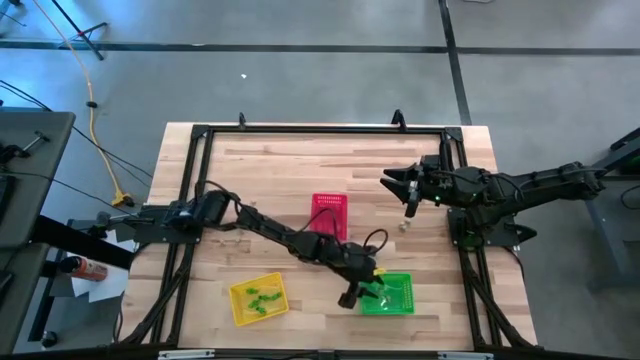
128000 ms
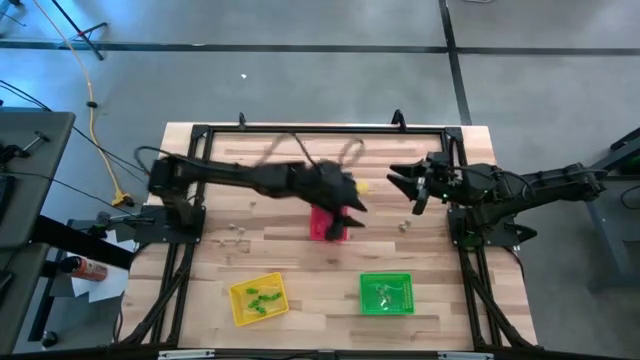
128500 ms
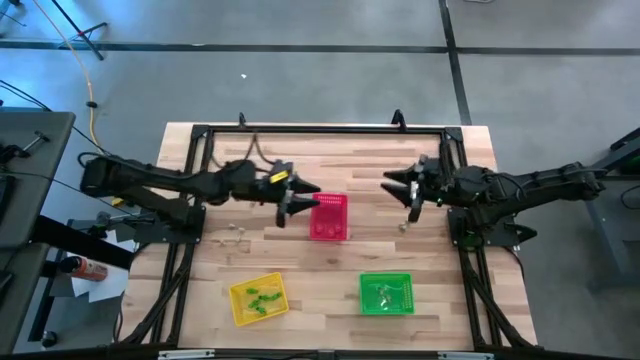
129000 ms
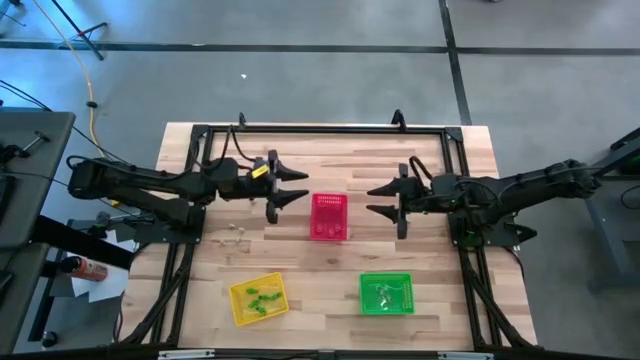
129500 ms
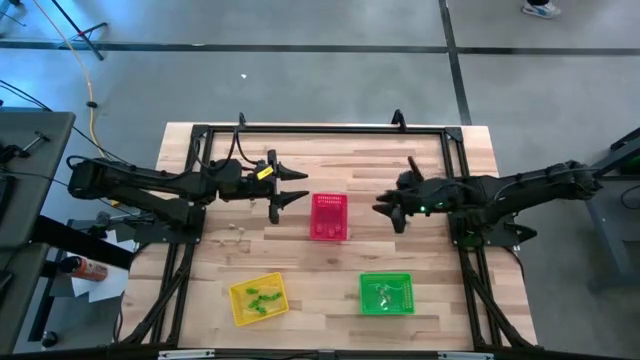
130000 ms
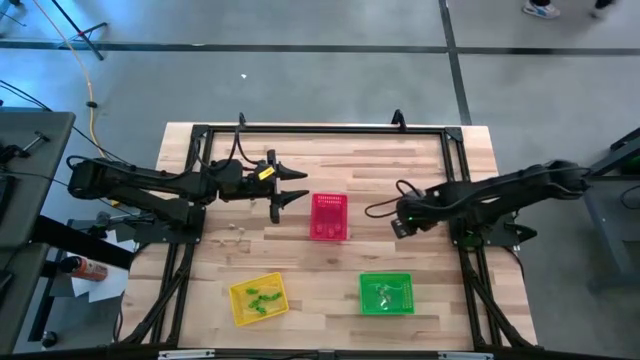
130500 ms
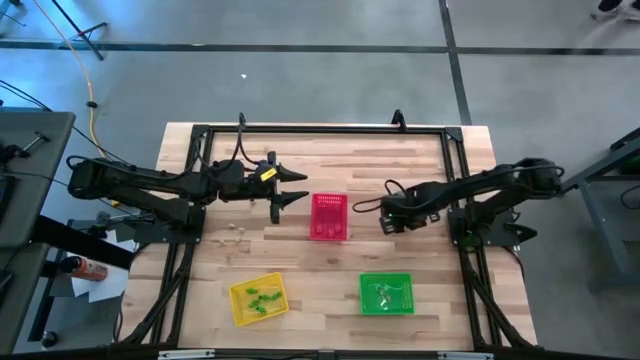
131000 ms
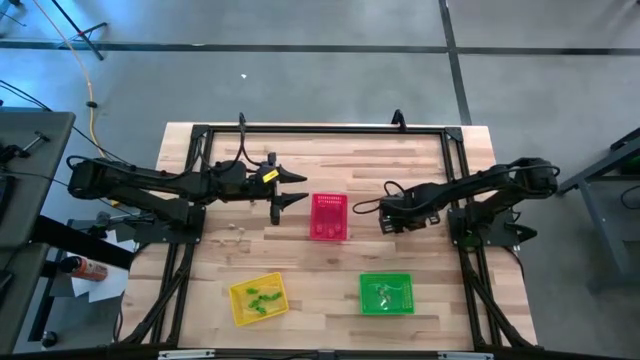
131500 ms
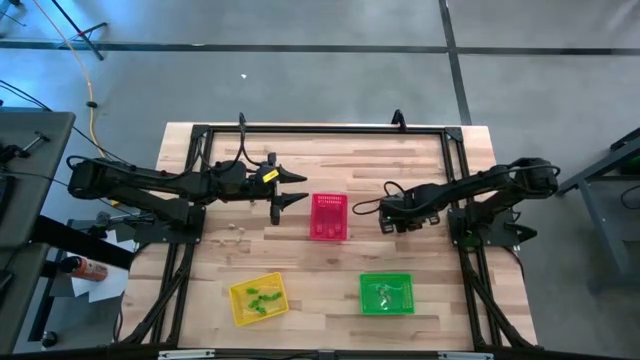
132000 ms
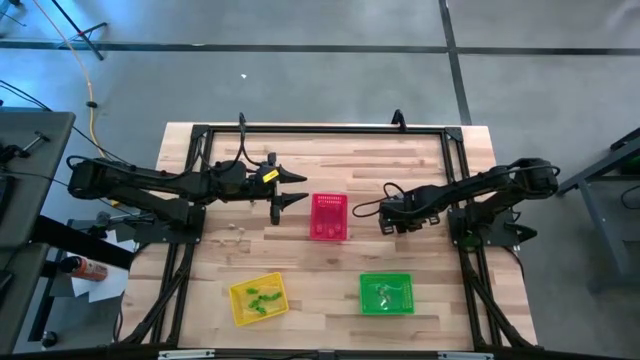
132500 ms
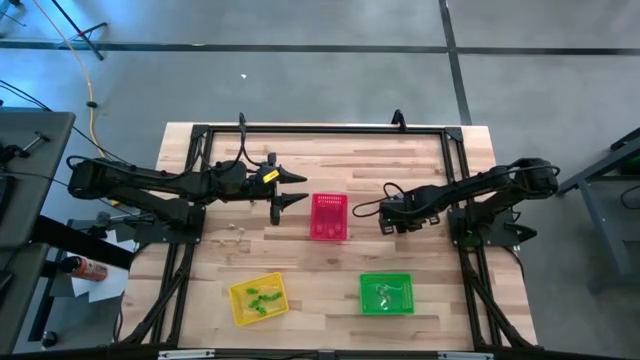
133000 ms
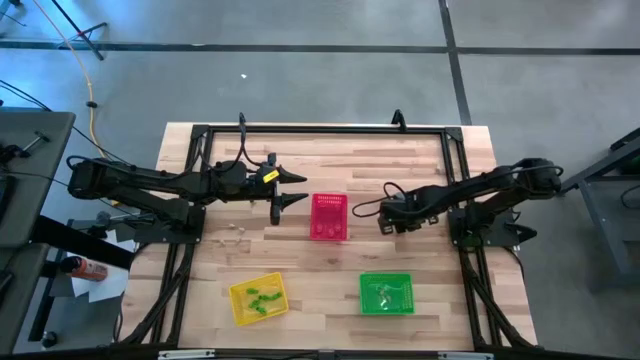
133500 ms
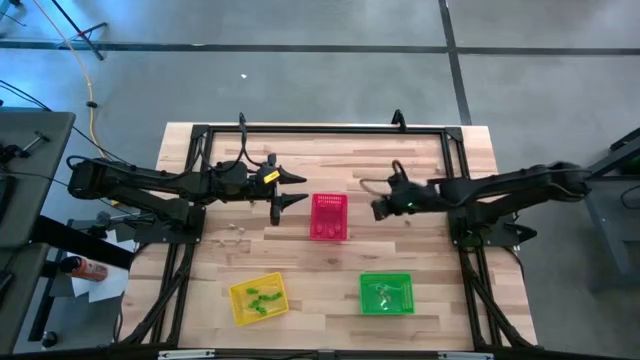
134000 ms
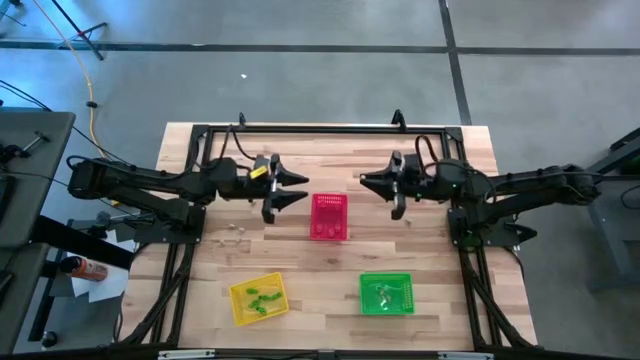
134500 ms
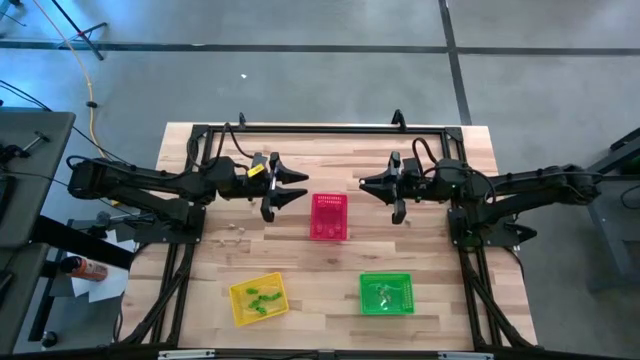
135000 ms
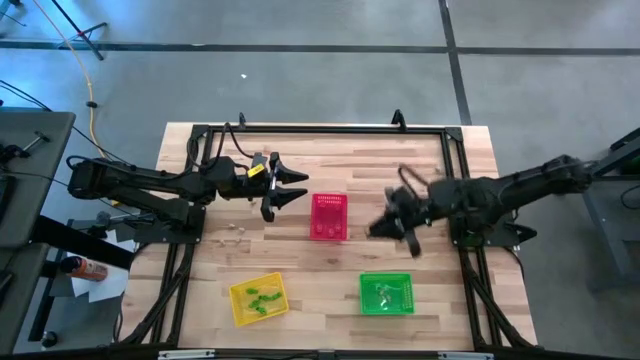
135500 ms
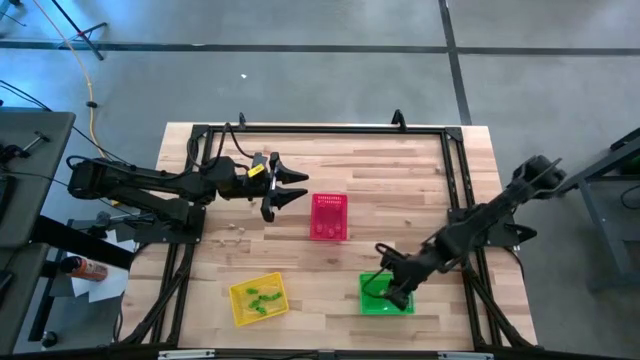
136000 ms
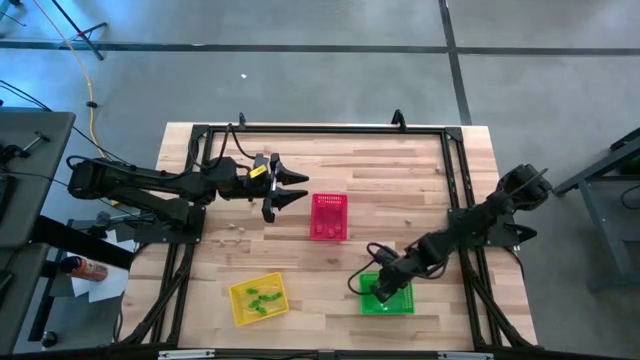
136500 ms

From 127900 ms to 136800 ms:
Task: Sort Halloween decoration
Put the white skull toy into the green bin

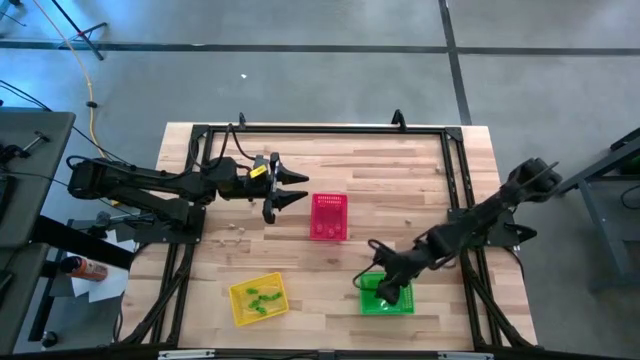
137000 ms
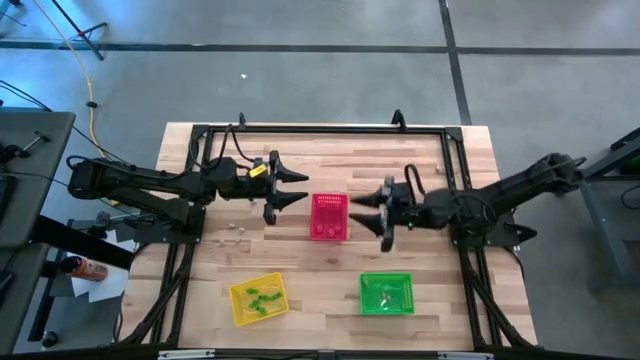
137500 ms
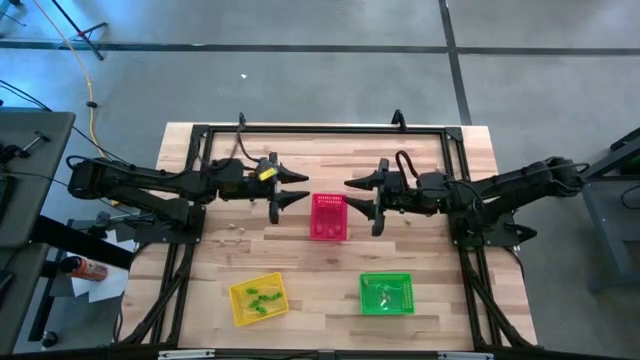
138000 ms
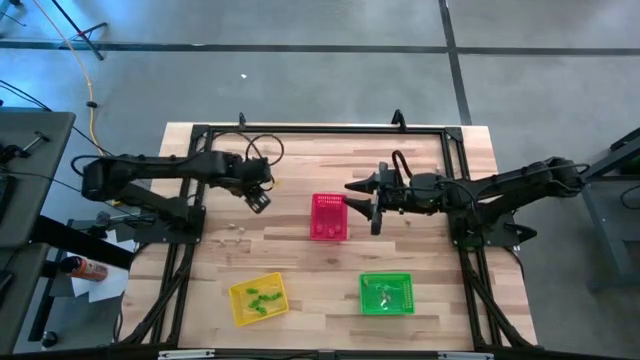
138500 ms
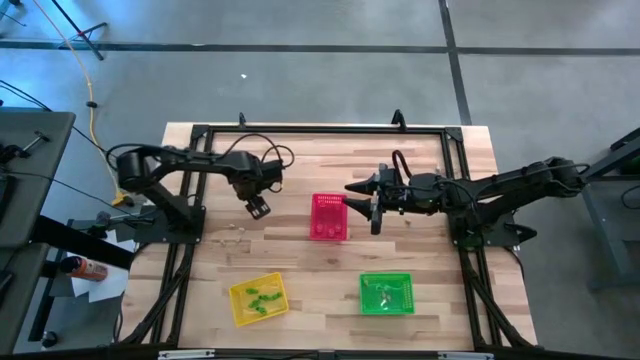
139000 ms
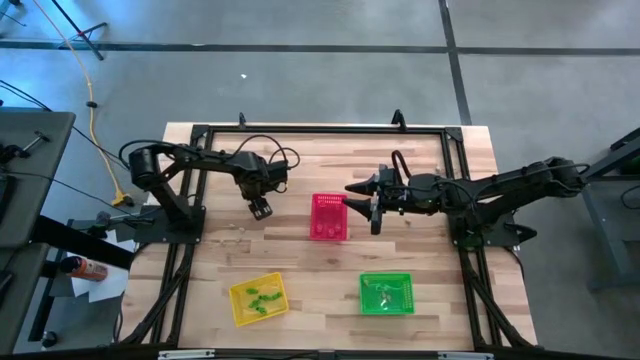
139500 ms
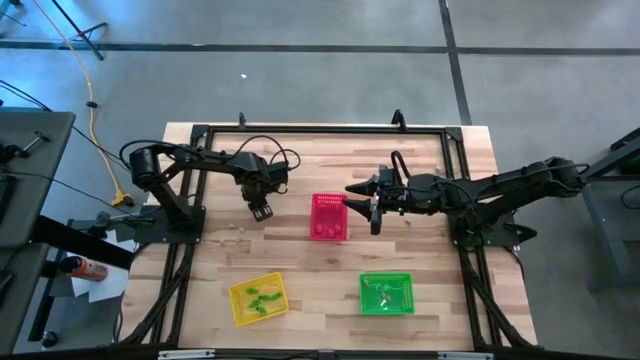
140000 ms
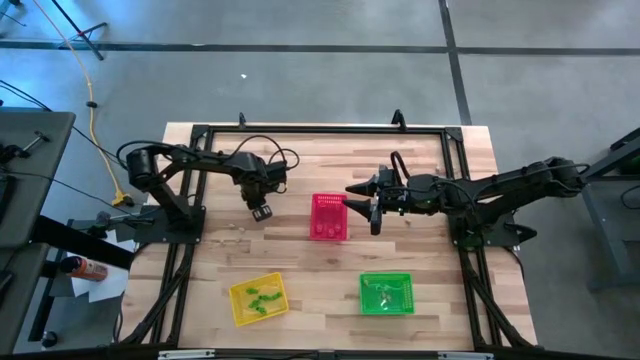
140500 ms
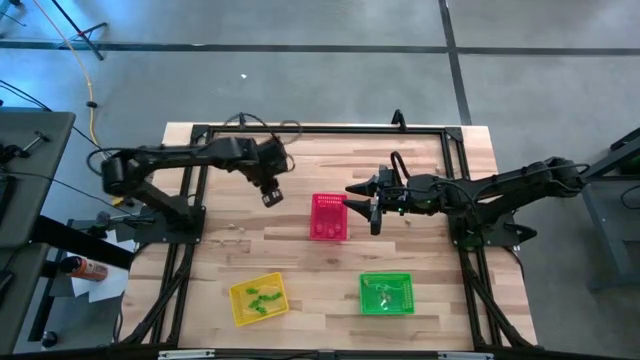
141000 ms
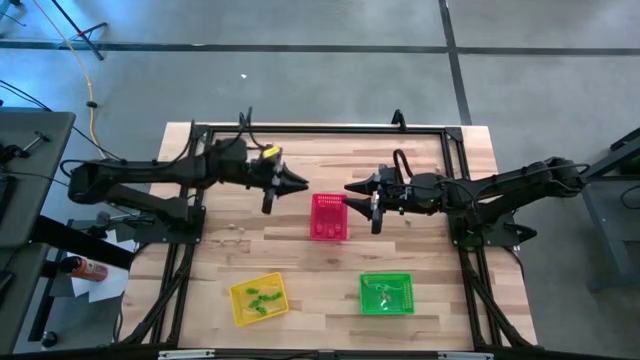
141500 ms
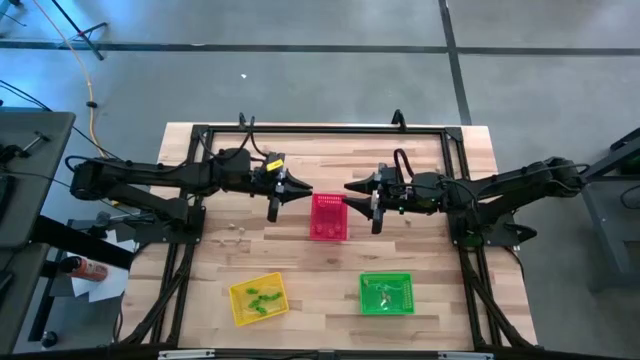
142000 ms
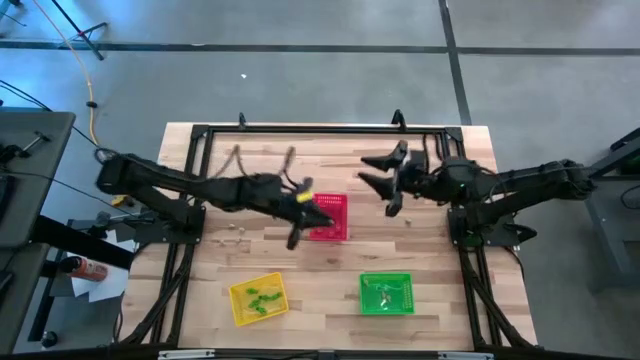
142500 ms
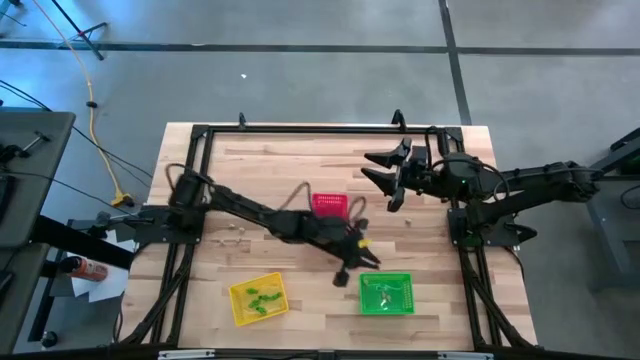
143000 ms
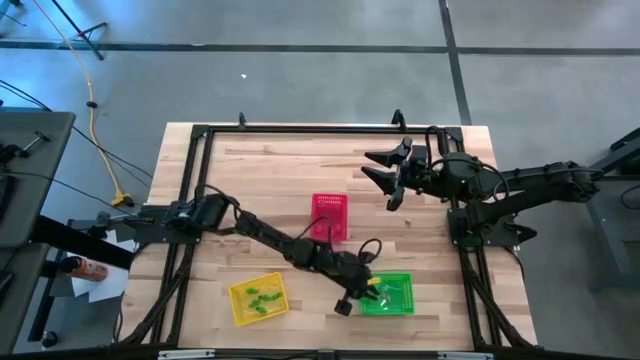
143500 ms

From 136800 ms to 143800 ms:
Put the white skull toy into the green bin

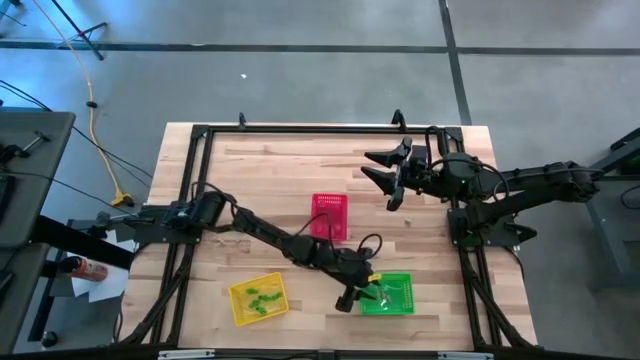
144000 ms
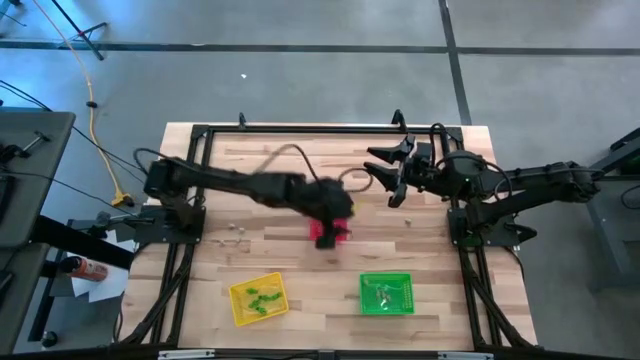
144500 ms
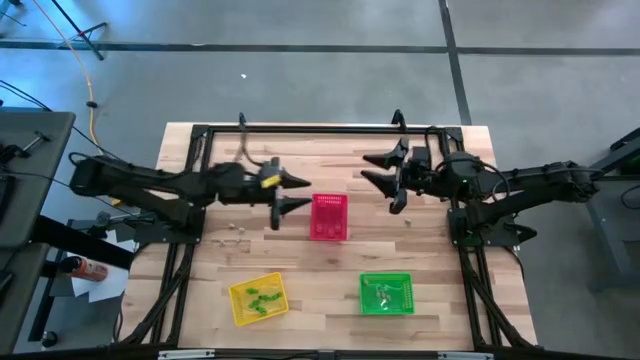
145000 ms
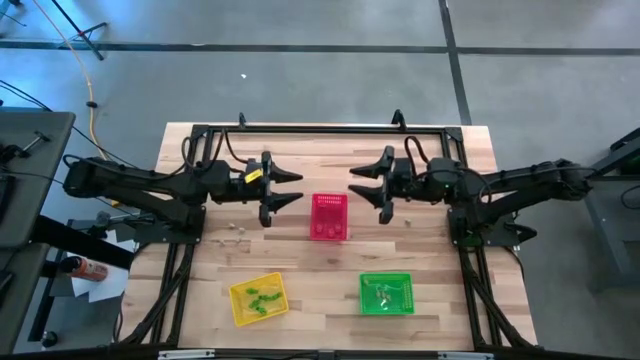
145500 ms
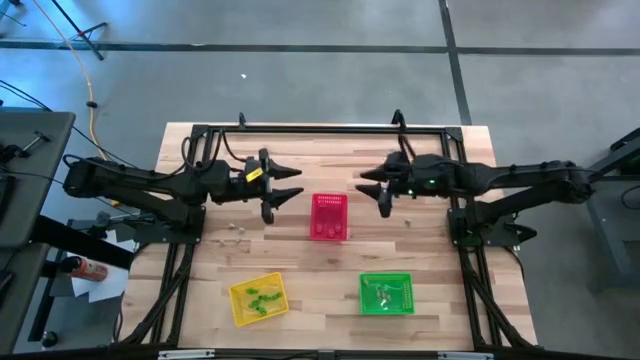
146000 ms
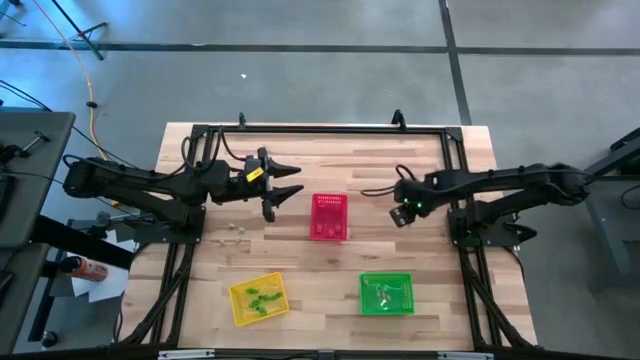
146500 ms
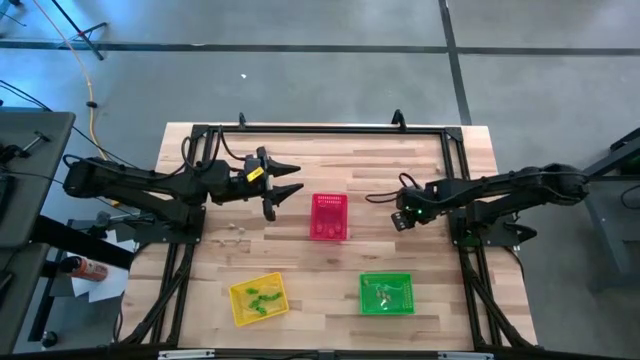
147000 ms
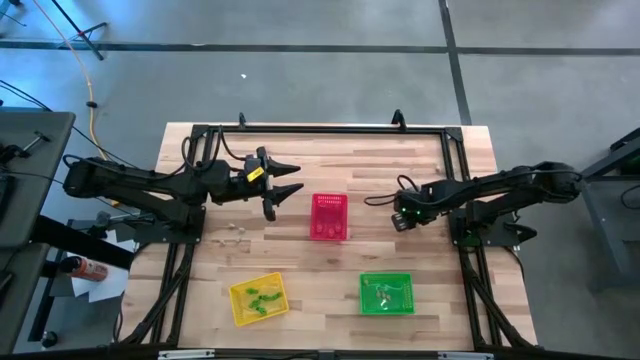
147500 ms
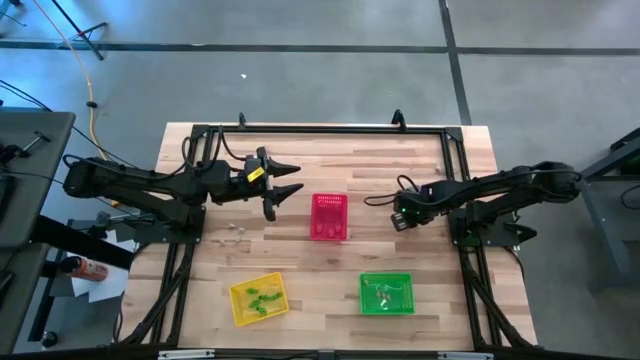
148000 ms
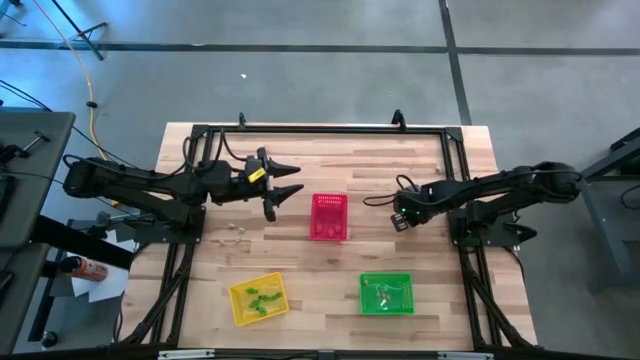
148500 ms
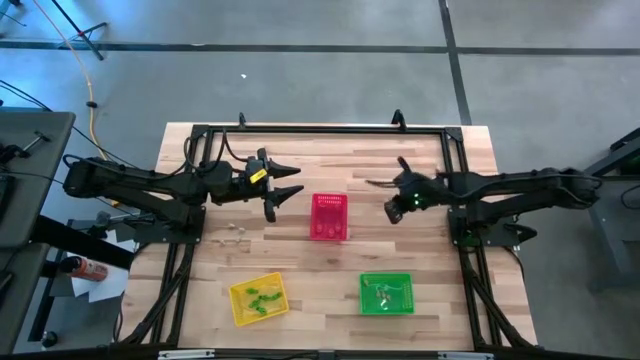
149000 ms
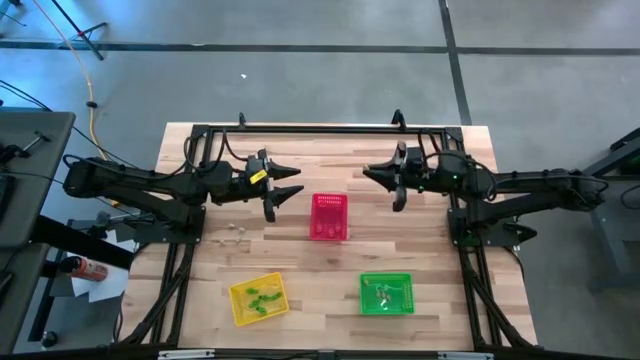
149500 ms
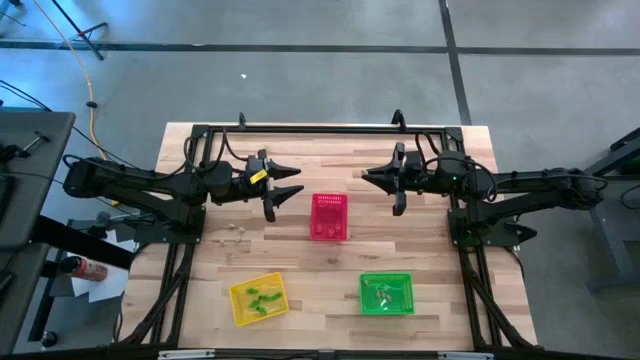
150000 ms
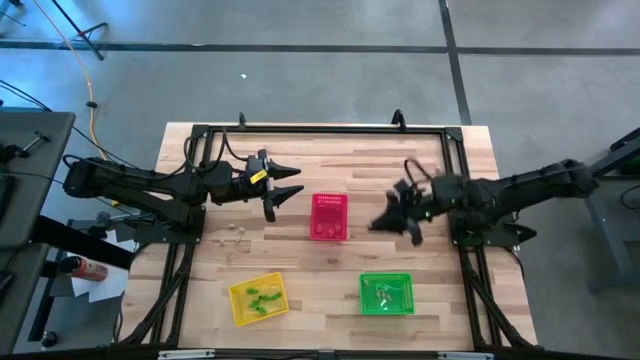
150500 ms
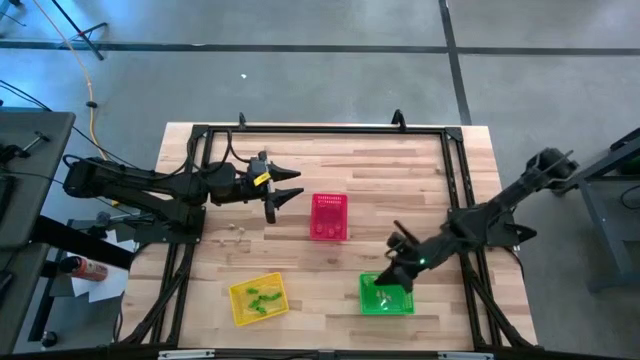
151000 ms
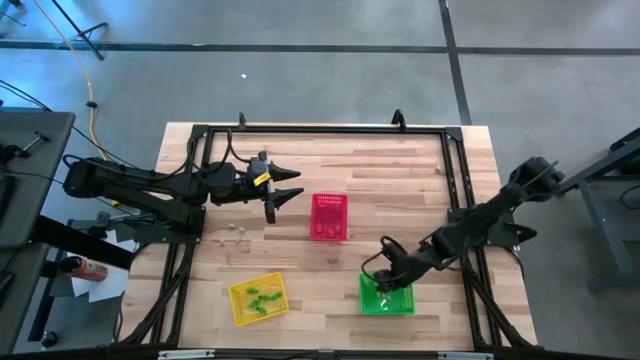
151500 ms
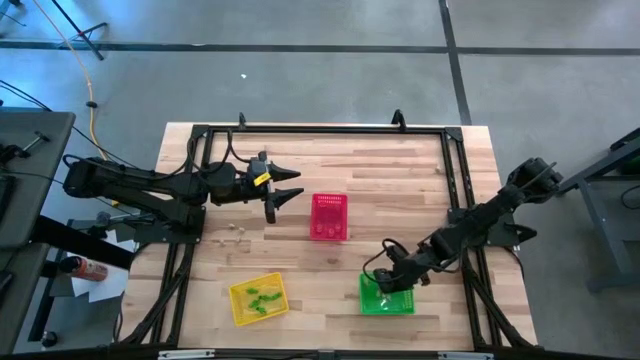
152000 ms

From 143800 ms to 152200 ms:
Put the white skull toy into the green bin
